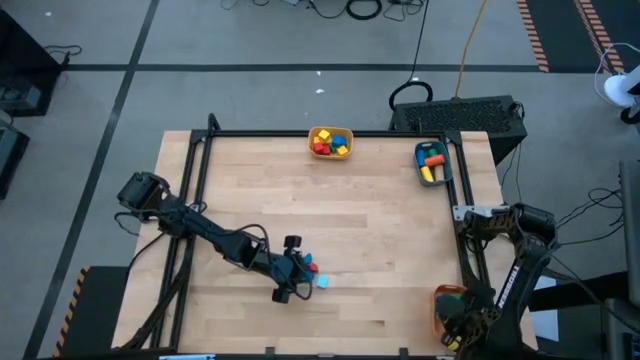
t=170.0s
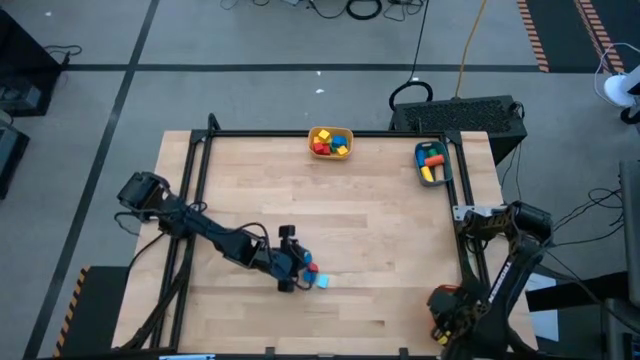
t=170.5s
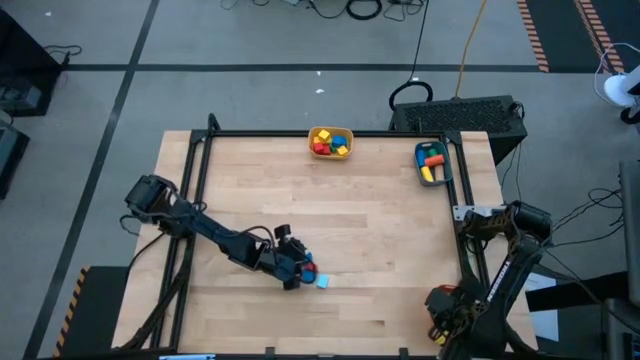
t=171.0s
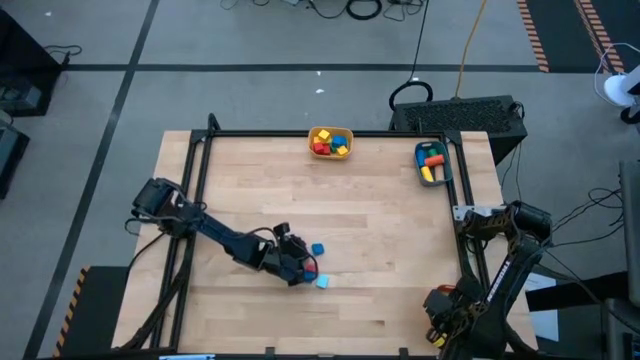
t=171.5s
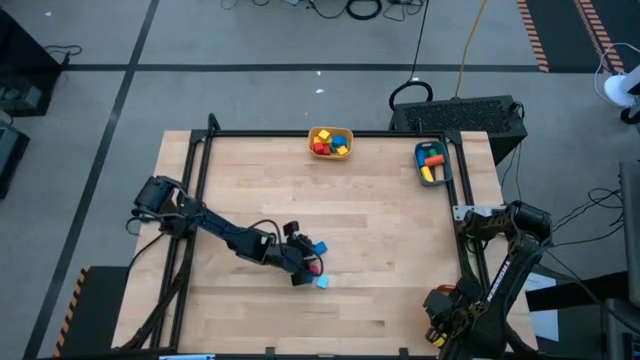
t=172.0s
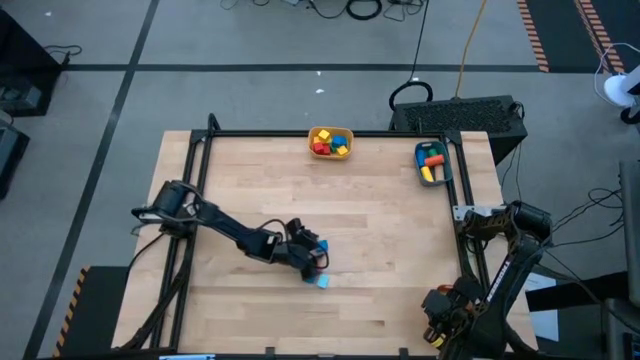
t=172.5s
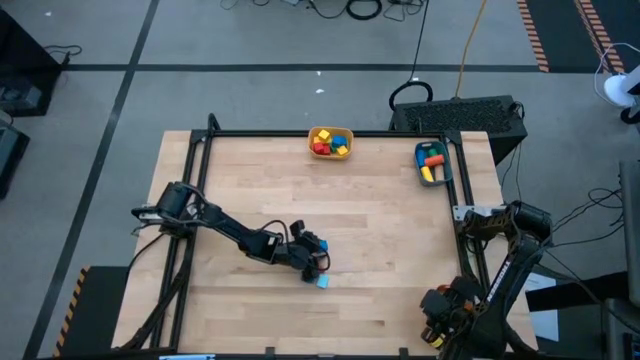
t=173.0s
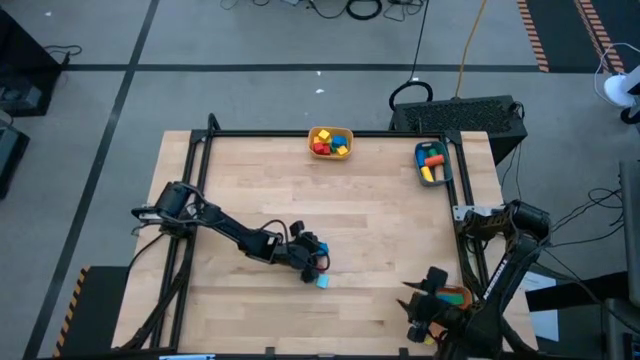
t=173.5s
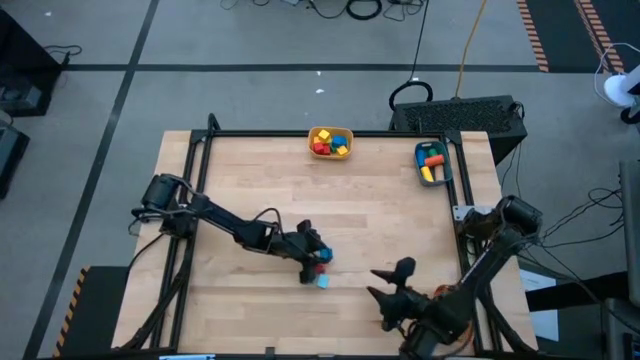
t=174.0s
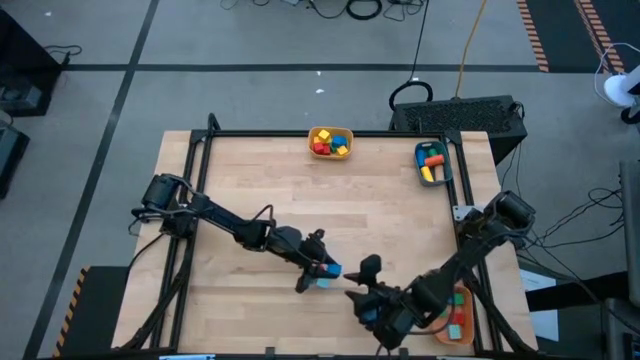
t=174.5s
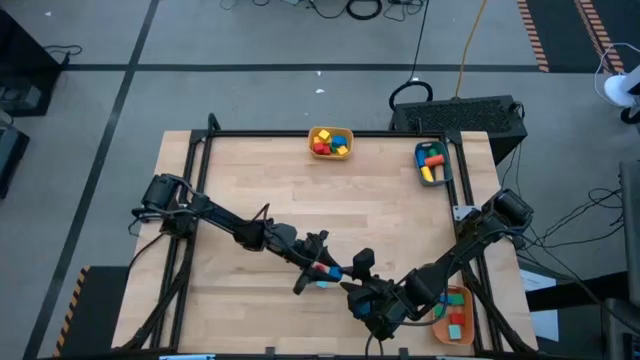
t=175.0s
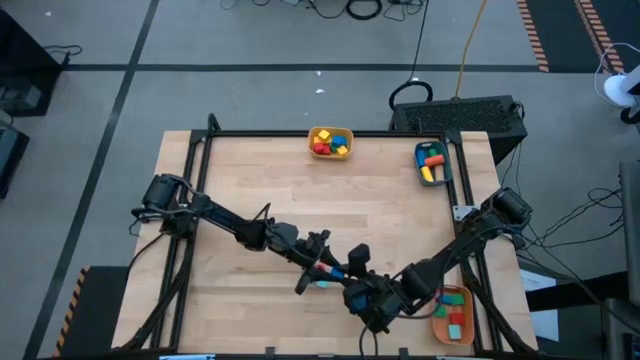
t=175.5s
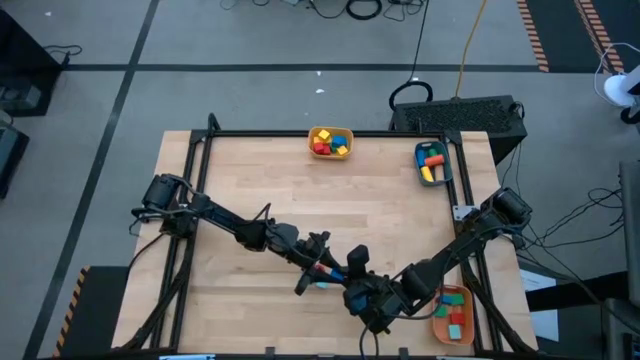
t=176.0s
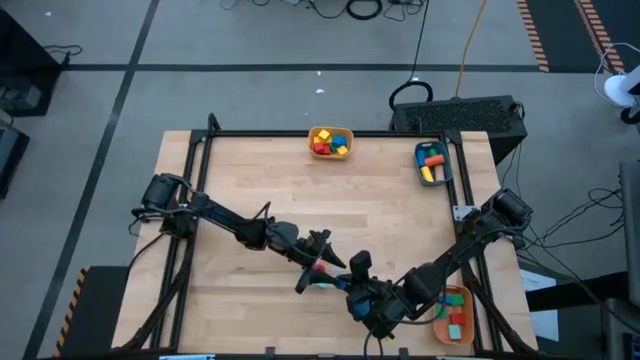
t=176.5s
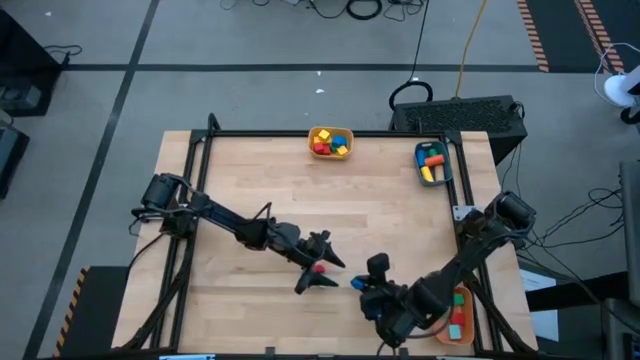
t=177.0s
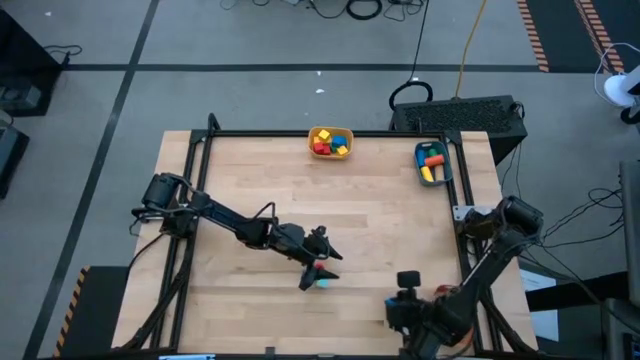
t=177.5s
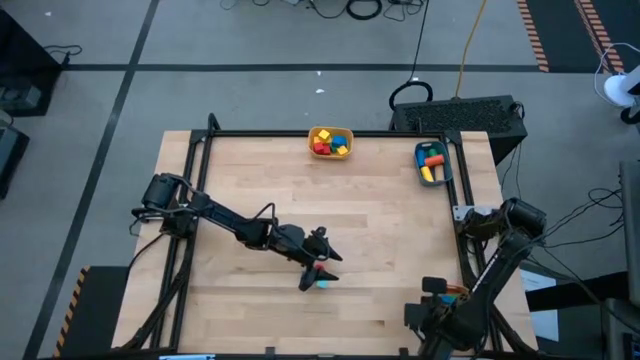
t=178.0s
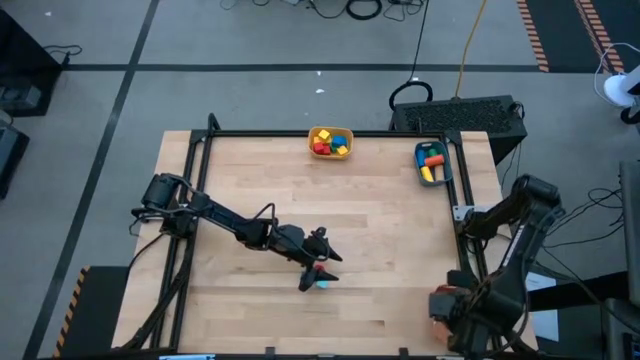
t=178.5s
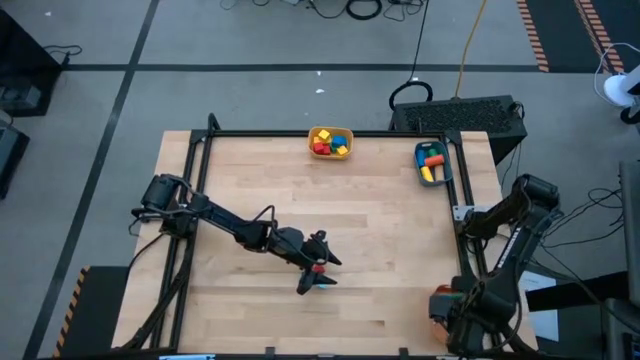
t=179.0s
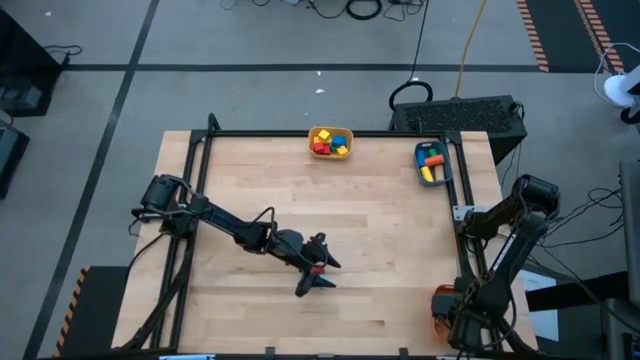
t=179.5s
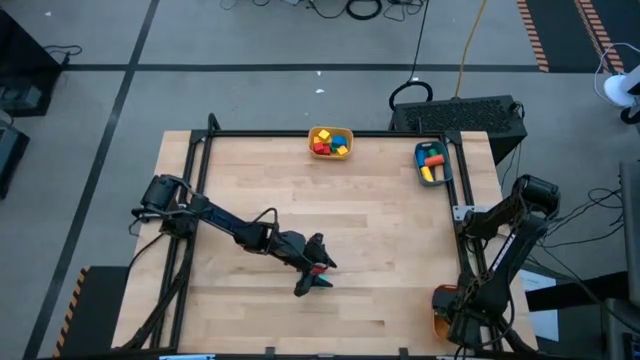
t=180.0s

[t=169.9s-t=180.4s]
Task: Sort blocks by size
Put the blue half circle block into the orange bin

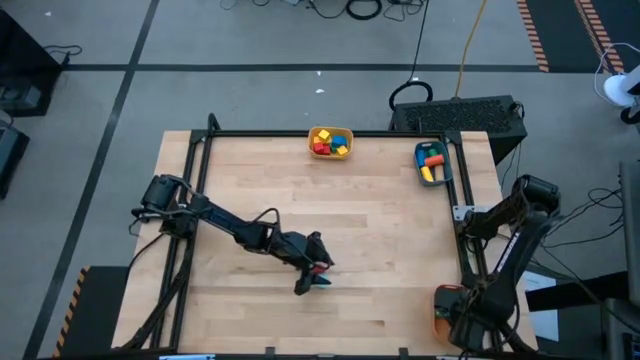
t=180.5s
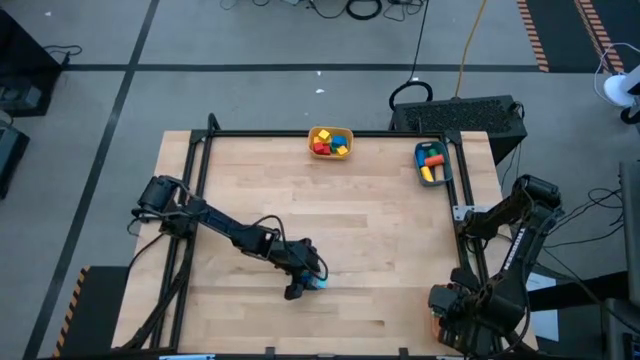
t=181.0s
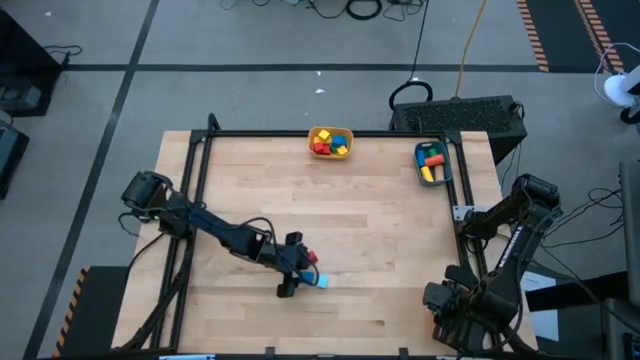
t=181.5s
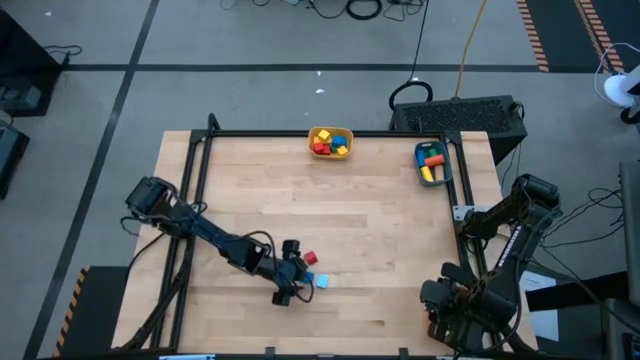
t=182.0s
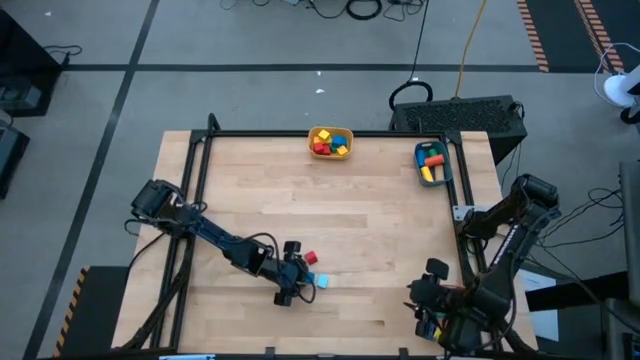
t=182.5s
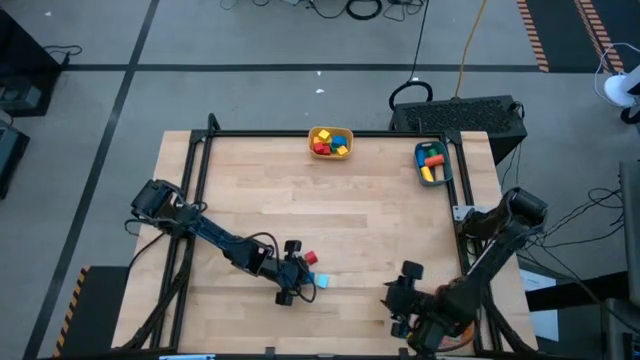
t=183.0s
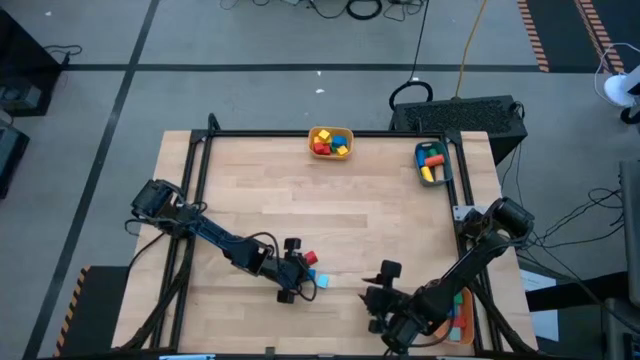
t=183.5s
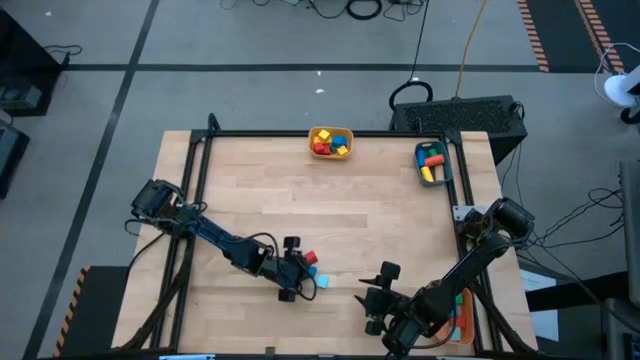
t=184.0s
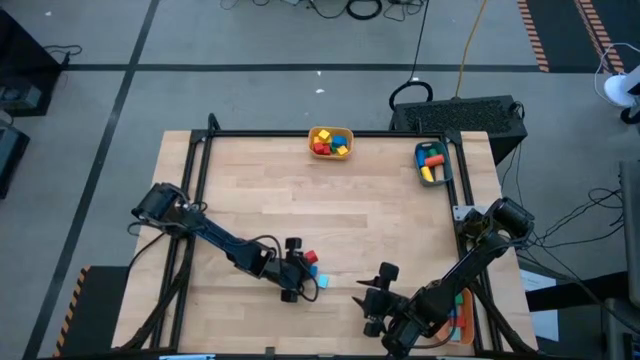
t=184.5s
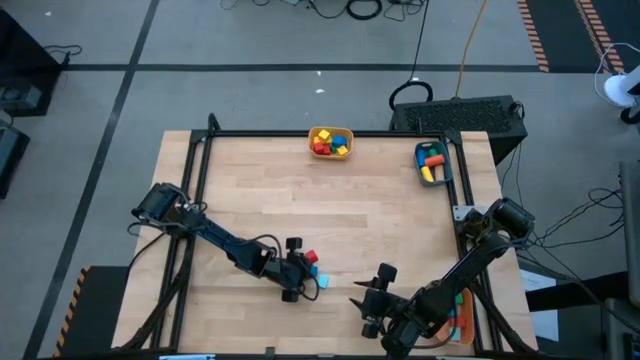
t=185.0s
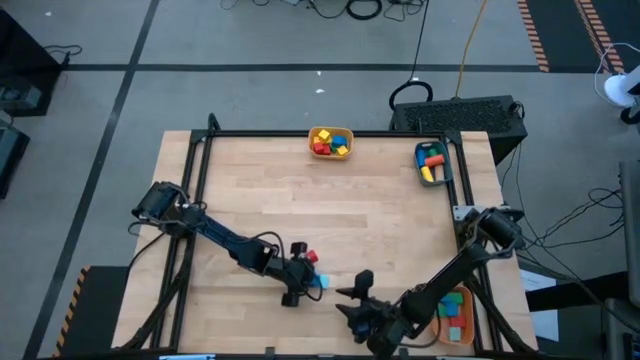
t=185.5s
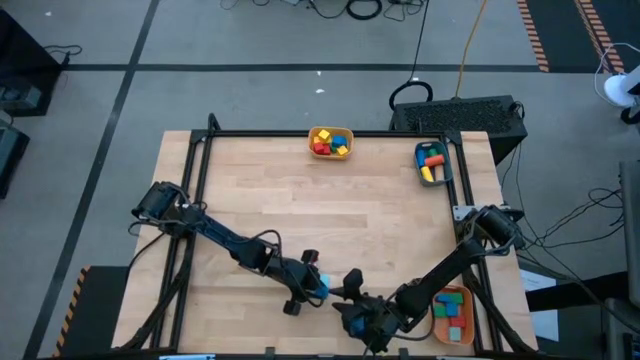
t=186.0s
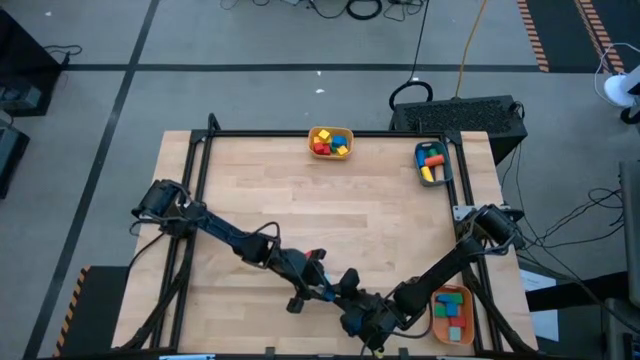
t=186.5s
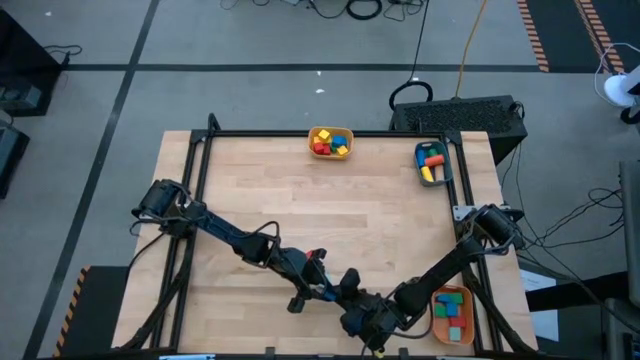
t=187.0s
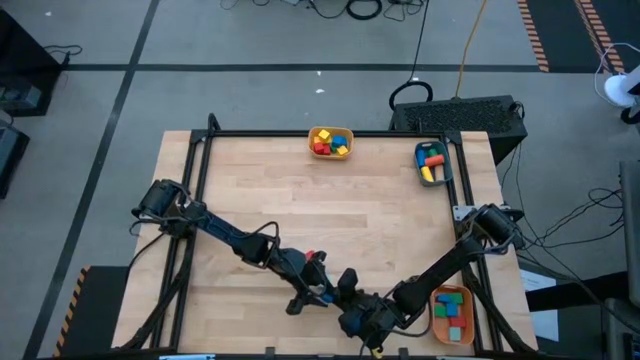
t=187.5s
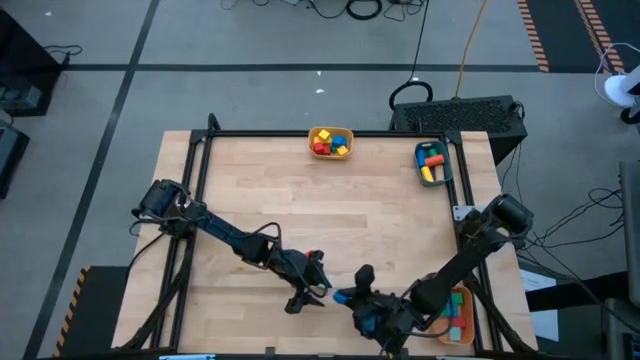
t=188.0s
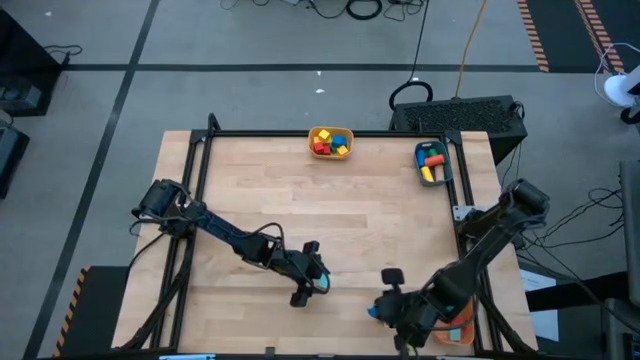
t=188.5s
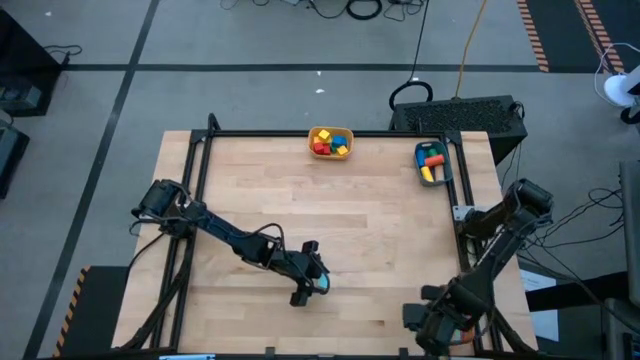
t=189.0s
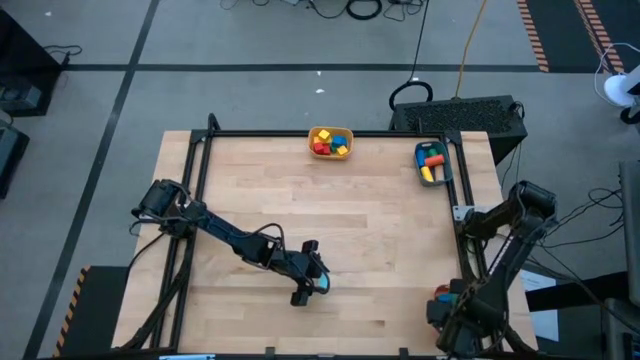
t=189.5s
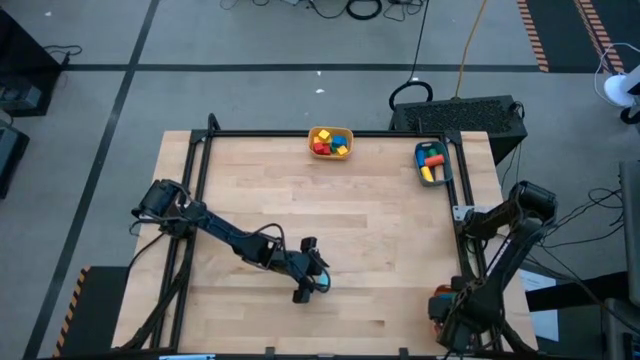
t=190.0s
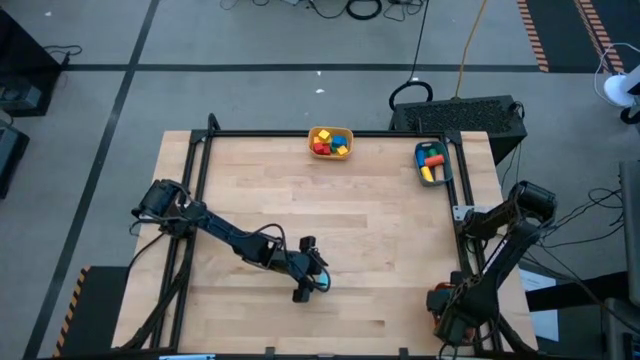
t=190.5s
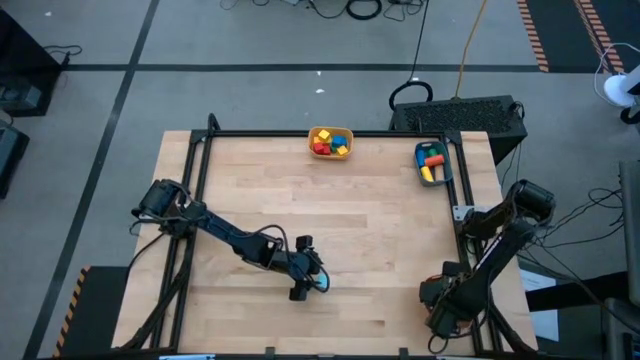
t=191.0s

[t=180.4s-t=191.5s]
Put the blue half circle block into the orange bin
